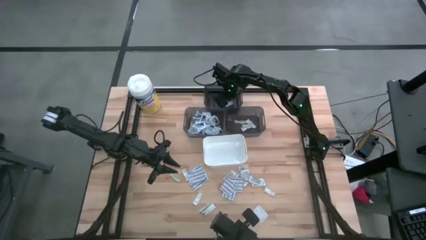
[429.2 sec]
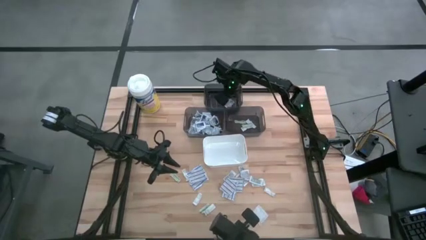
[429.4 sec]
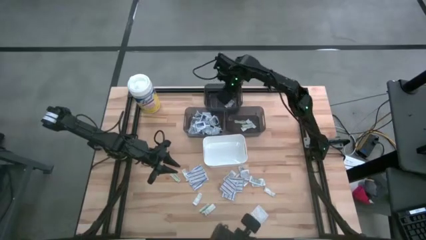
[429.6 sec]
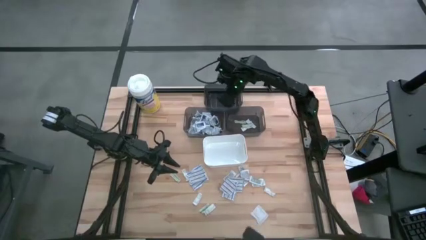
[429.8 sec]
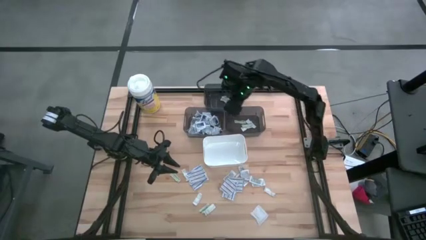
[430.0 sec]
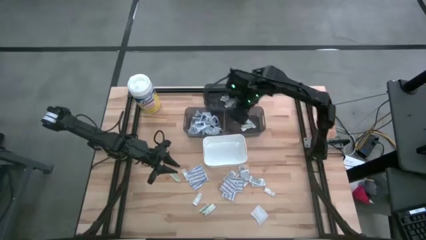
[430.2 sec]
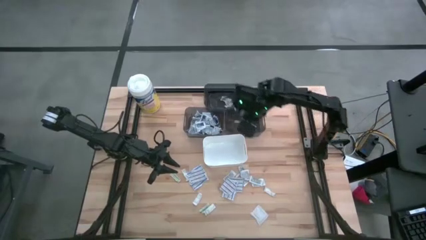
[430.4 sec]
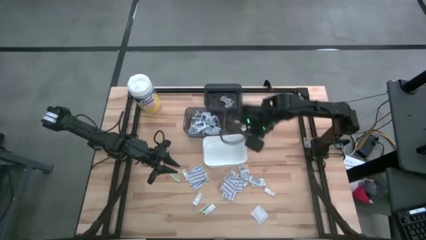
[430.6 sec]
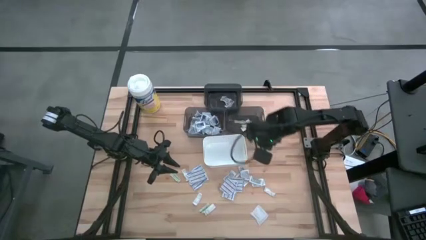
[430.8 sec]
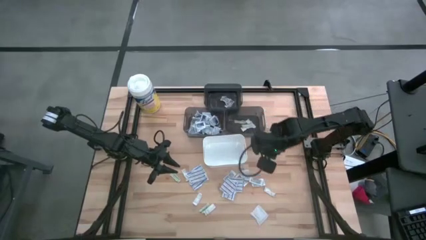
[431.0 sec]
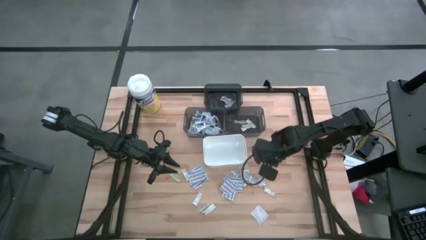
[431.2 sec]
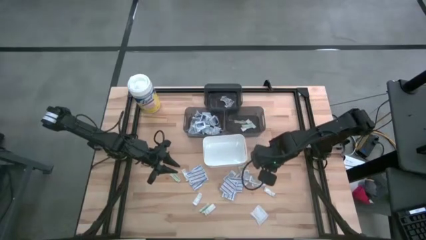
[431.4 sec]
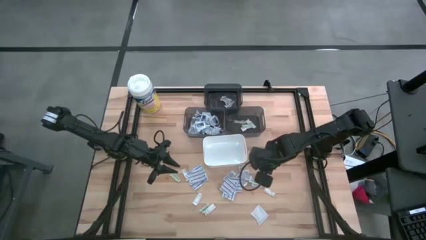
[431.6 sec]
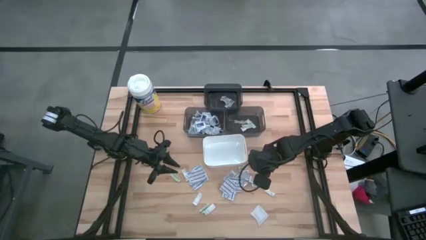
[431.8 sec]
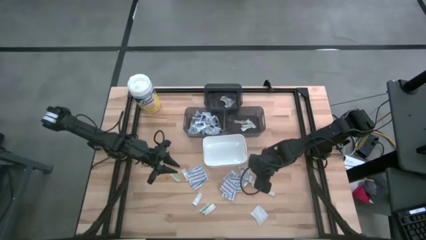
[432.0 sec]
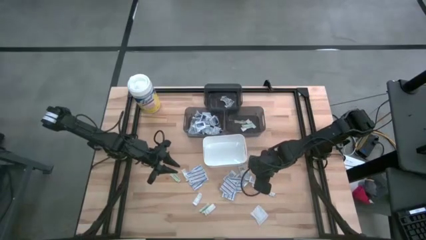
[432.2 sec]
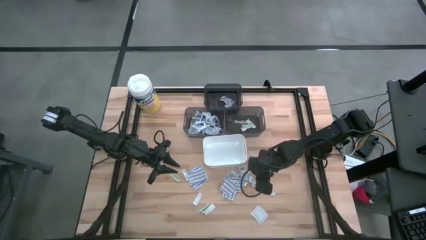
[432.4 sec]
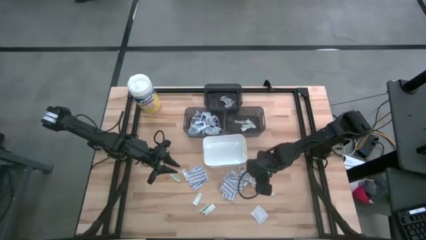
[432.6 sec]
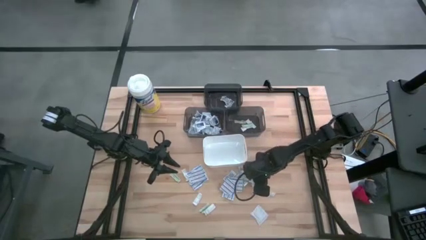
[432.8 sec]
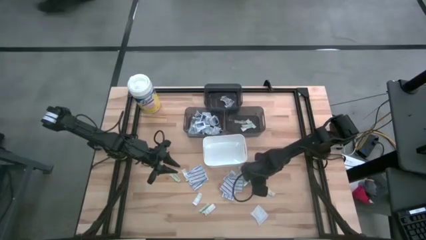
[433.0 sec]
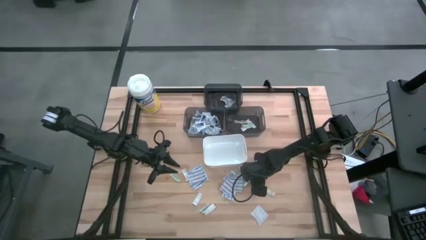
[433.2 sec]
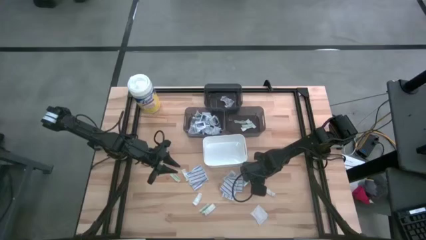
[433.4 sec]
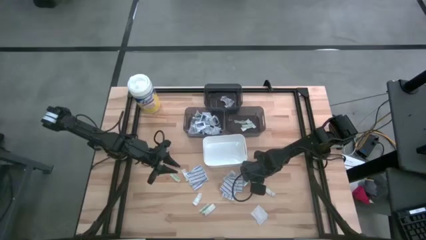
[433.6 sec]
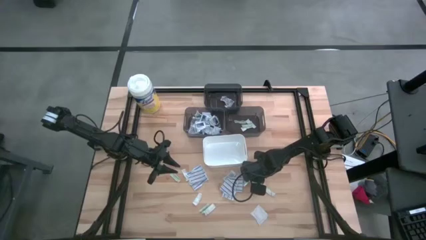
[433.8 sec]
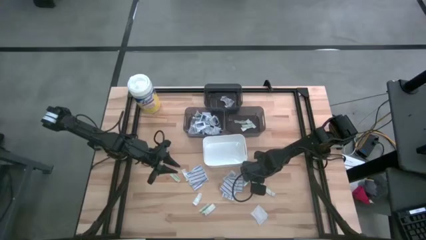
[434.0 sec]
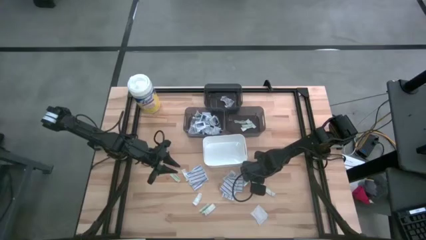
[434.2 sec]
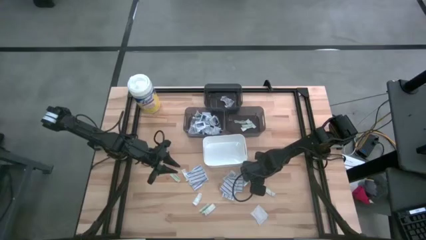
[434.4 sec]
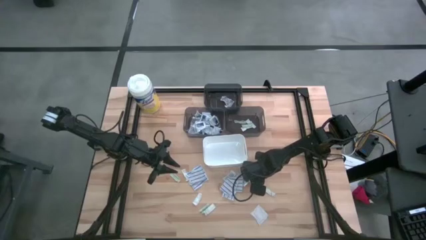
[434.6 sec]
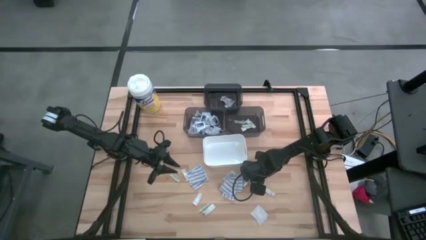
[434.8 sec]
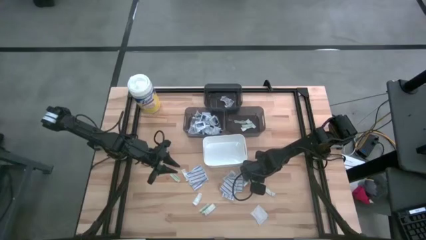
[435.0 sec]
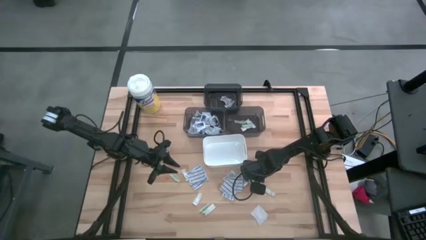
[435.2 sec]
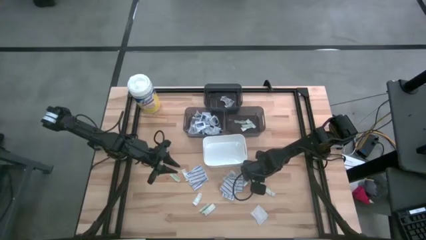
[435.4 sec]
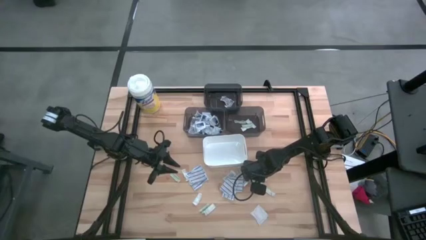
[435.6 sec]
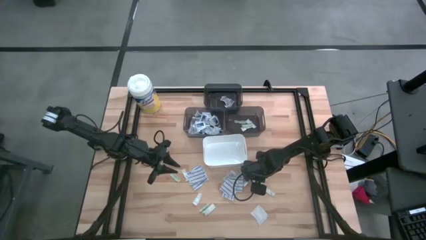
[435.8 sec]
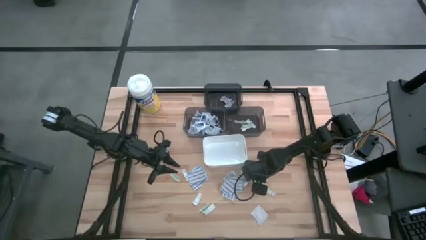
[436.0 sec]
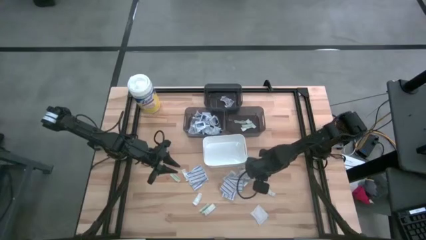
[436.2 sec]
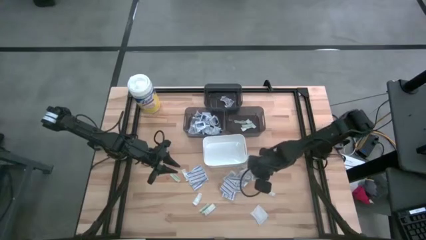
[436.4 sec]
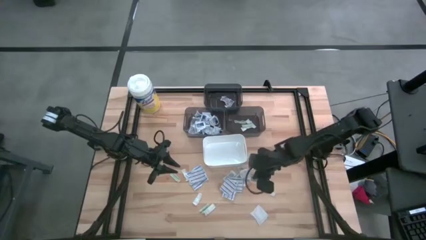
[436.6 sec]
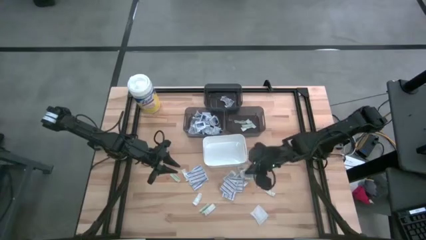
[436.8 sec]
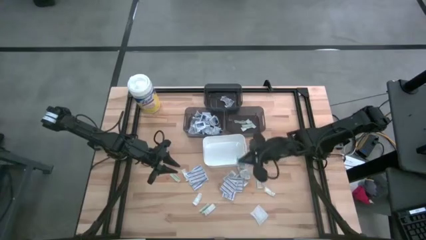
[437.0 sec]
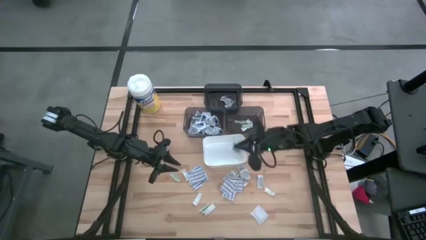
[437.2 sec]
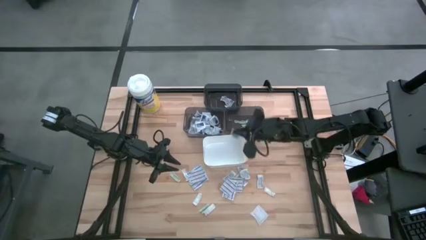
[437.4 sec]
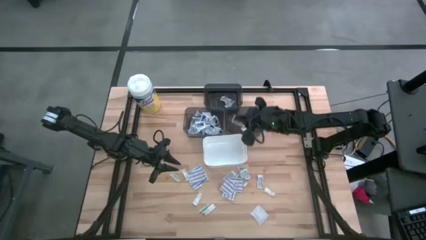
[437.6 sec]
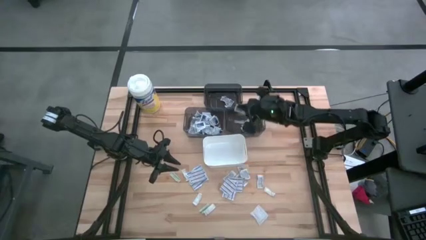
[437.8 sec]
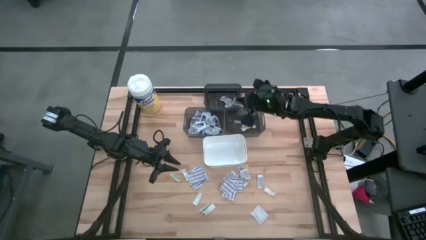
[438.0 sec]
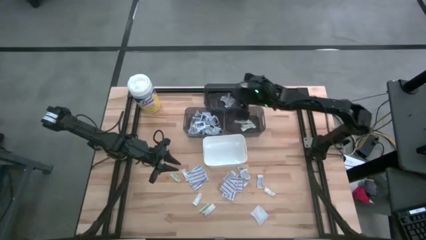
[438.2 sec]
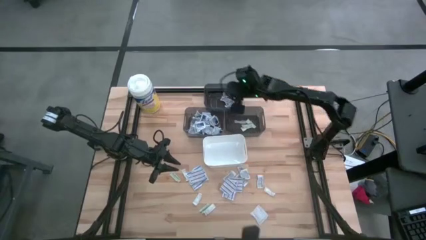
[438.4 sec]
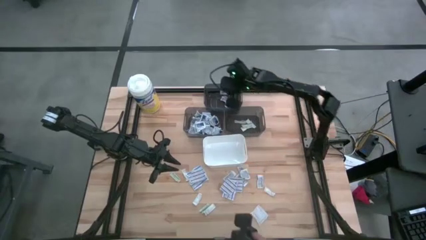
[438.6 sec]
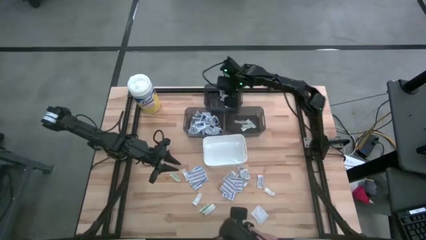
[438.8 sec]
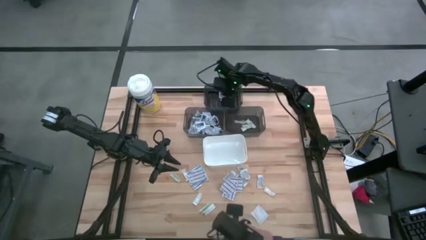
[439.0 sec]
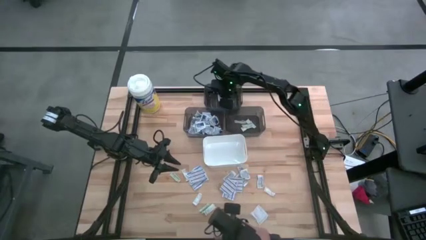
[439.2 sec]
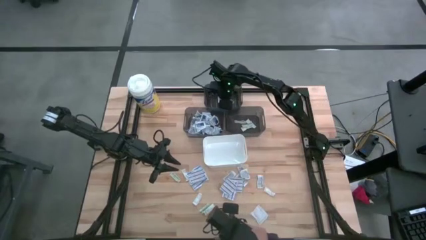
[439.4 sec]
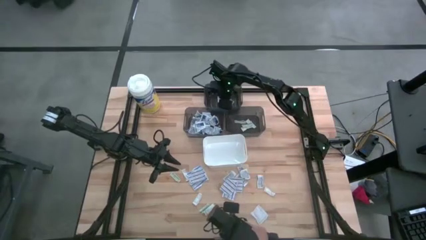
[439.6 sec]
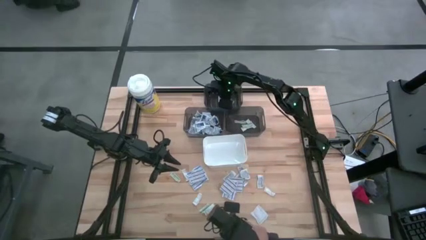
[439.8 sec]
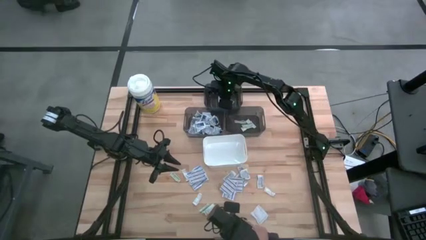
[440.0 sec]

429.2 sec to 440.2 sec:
Task: Pick & Place First Aid Supplies
Put the ointment pack into the top black bin

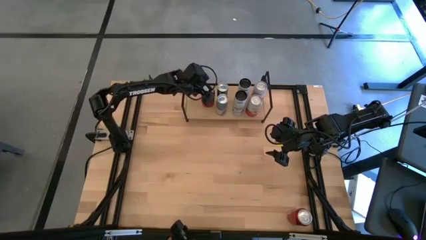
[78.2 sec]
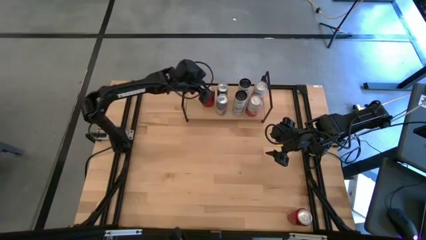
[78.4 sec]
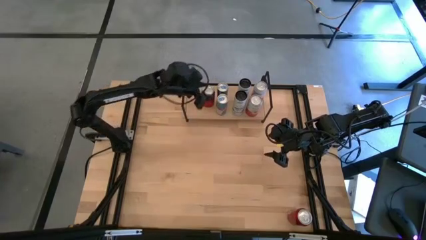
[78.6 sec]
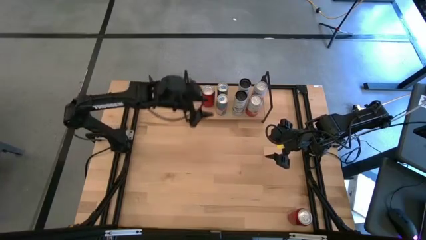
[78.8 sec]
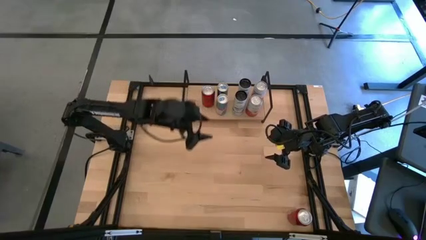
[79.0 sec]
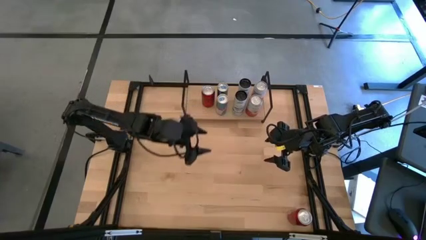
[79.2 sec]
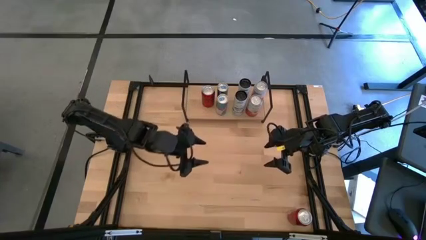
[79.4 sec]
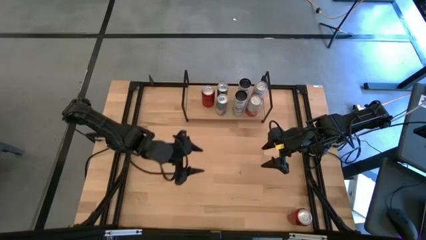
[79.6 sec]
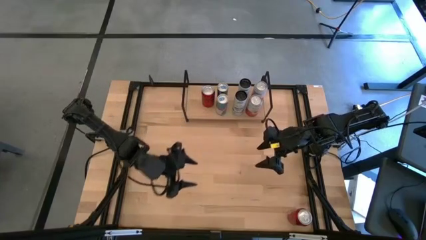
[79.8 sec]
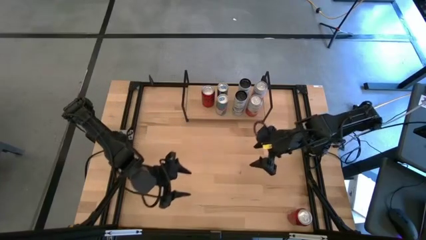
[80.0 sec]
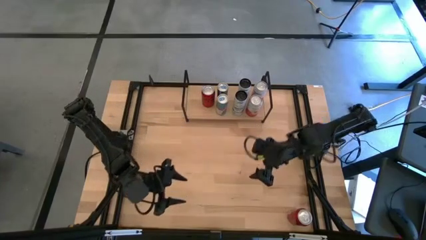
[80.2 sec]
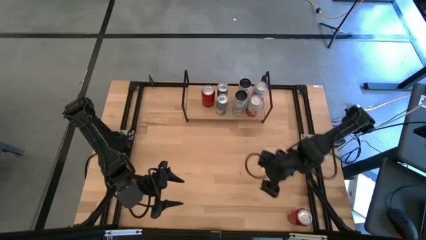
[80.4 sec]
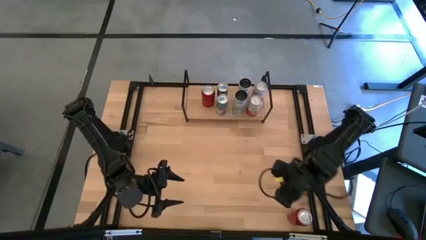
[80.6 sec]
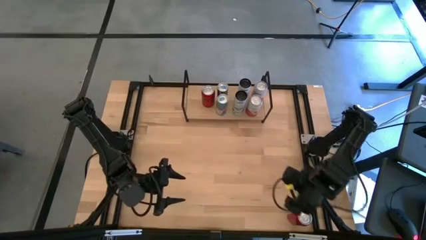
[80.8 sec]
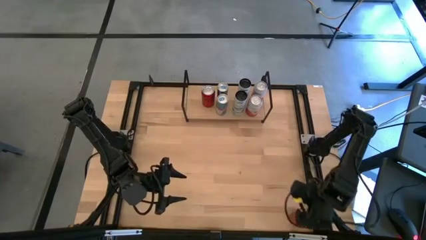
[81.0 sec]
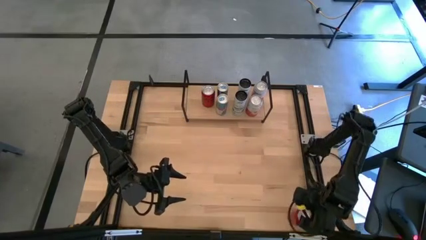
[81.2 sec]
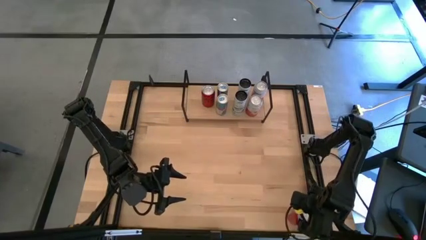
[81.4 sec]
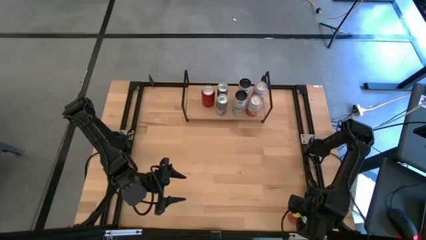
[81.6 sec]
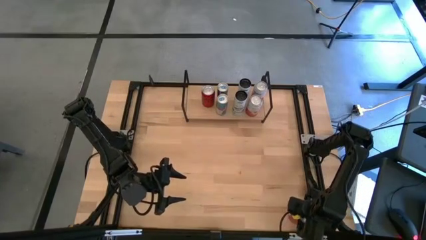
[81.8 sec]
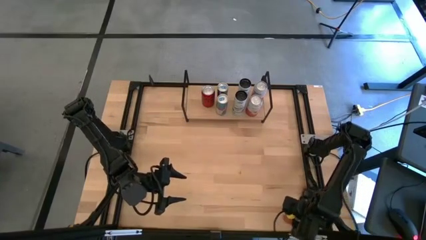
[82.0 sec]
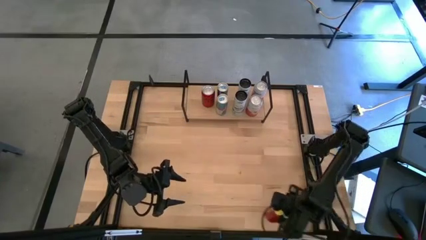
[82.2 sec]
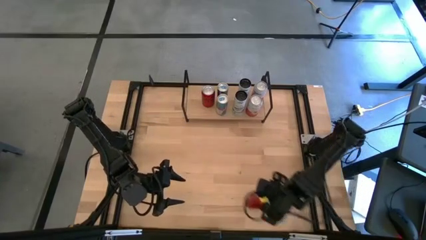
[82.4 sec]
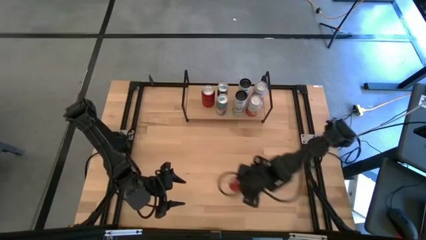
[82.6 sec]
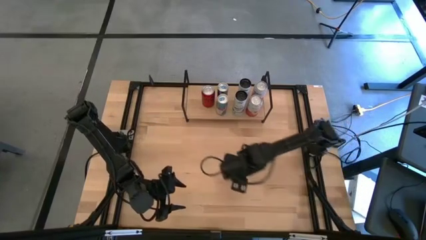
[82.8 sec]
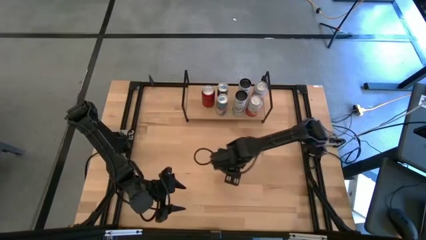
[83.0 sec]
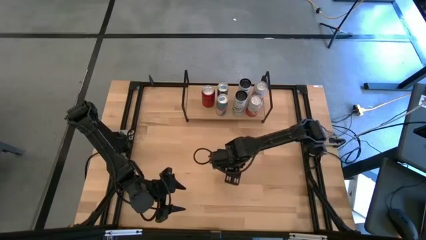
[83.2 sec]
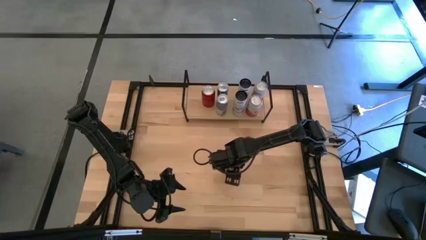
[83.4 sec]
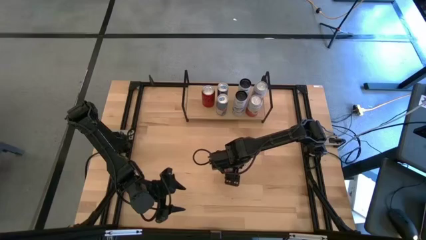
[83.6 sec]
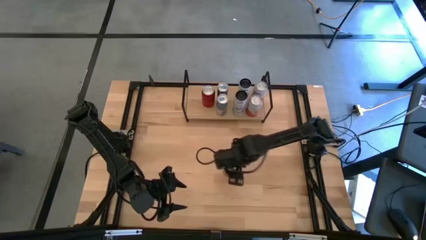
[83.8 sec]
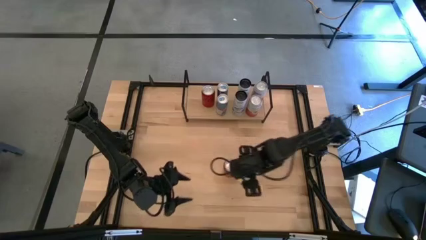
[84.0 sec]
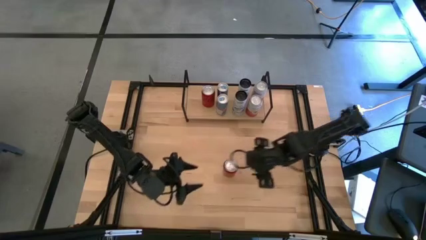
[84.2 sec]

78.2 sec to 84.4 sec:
Task: Place canned beverage on shelf
Move the red and black soda can to the center of the table
